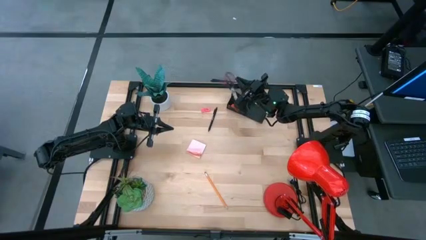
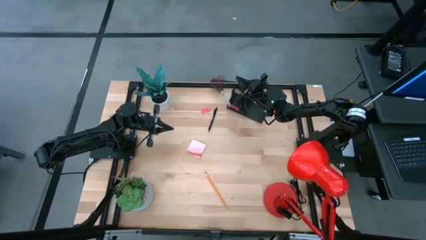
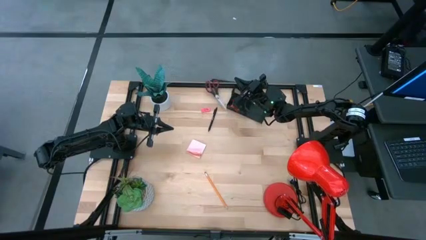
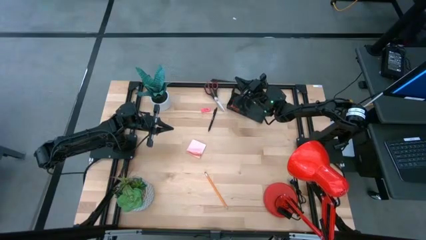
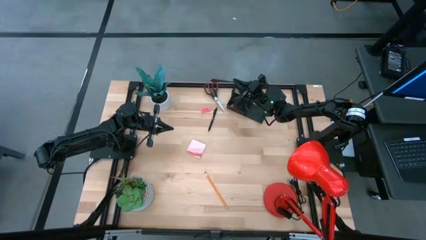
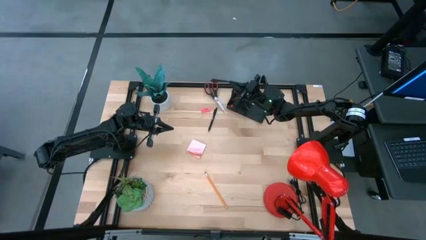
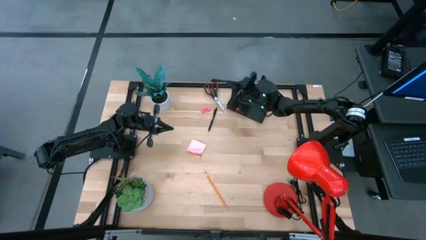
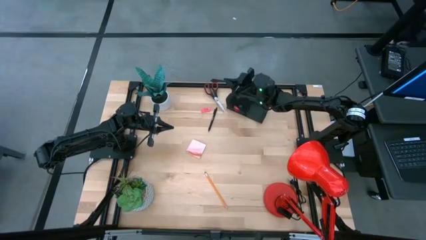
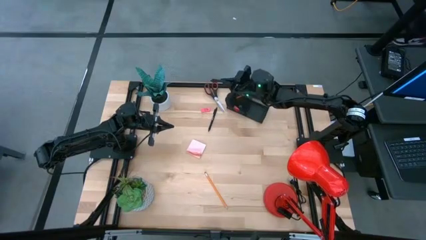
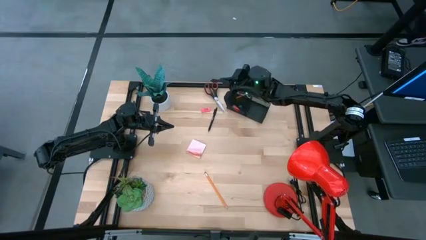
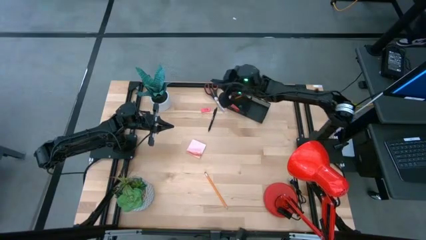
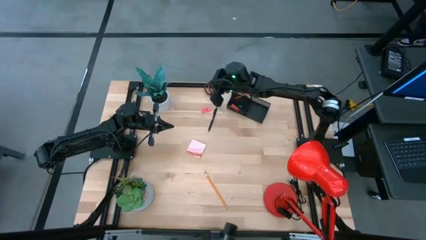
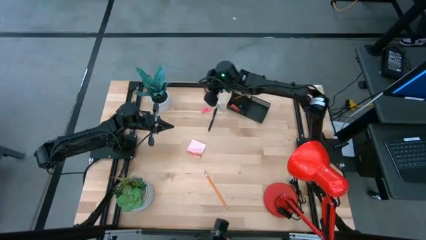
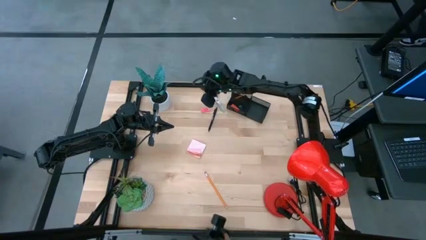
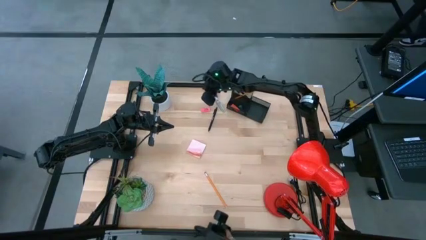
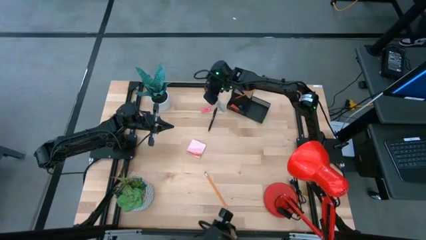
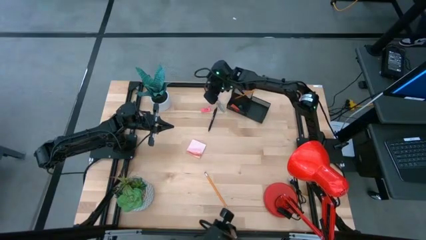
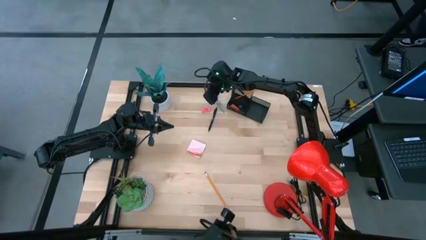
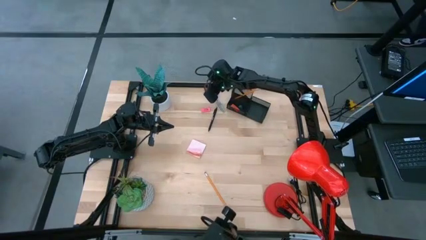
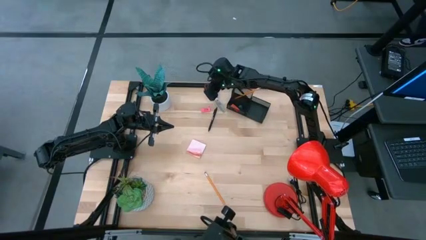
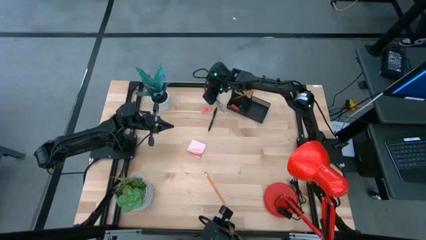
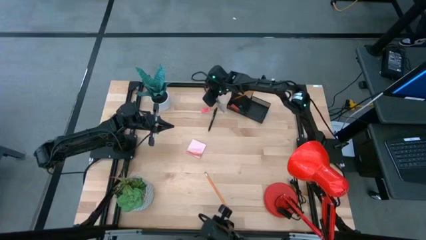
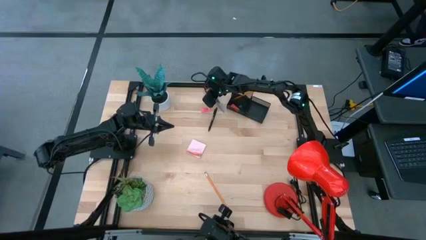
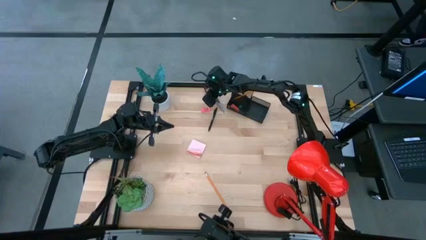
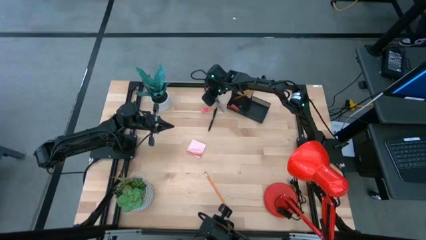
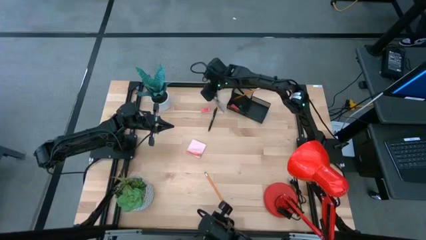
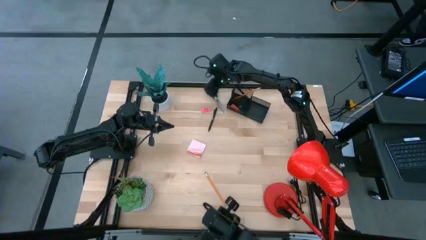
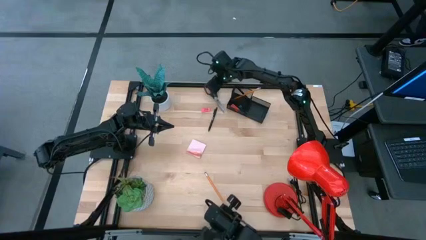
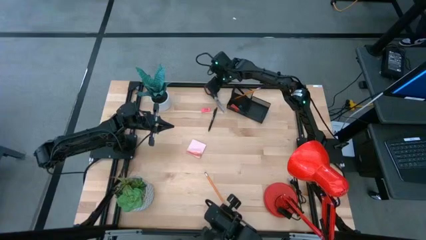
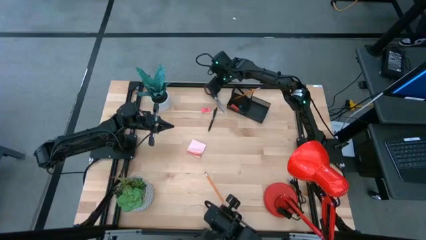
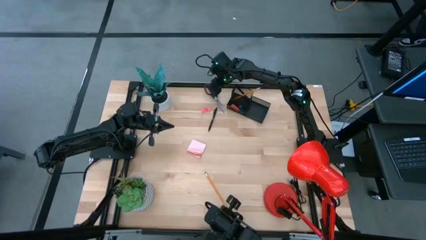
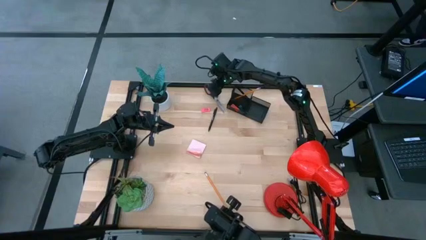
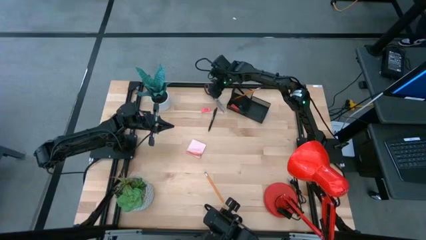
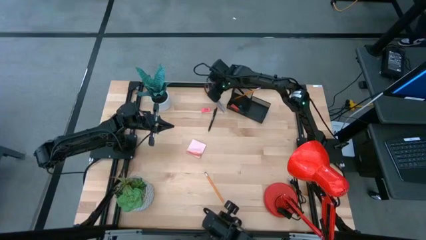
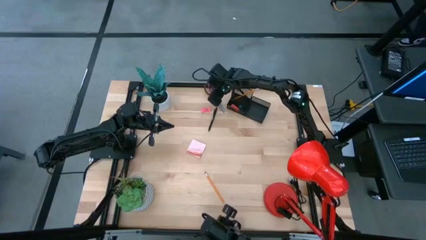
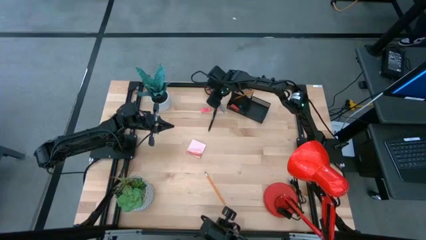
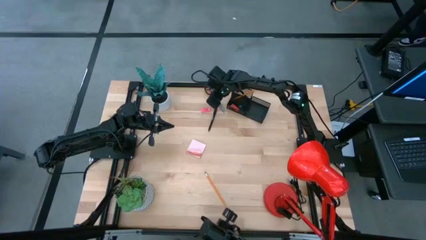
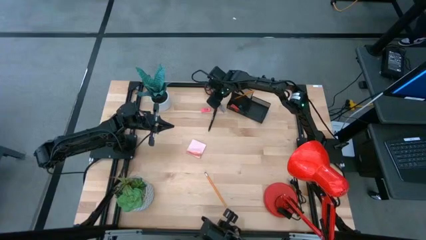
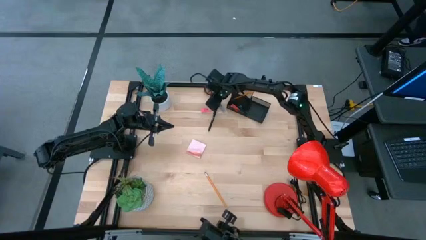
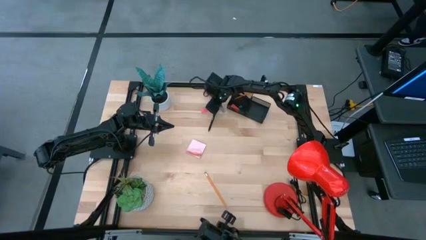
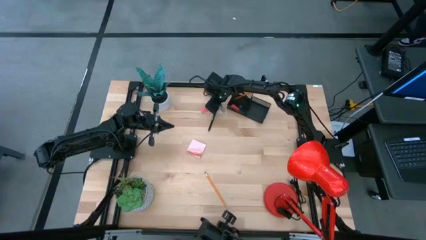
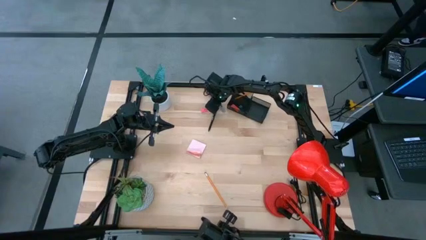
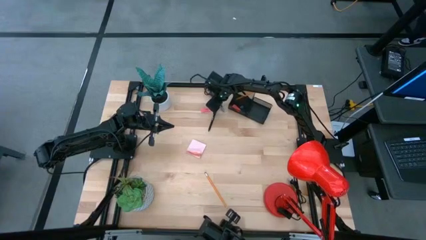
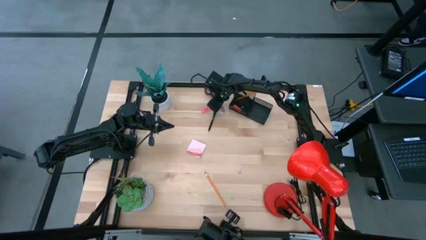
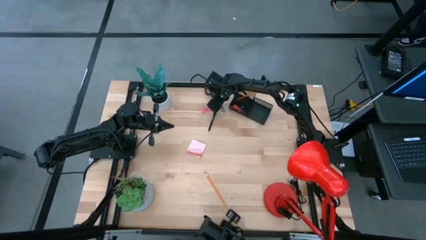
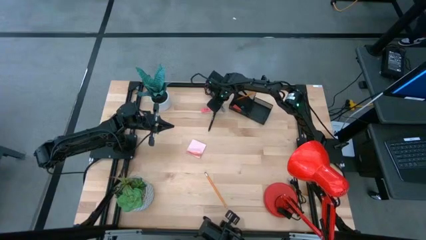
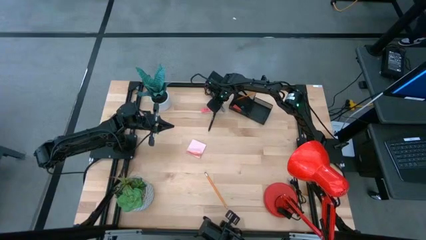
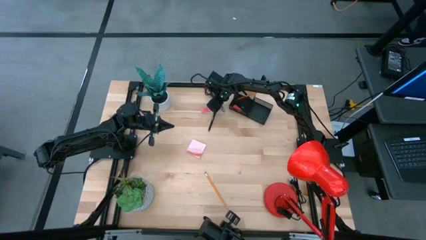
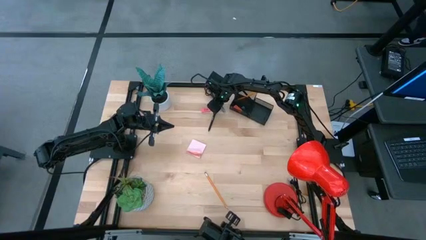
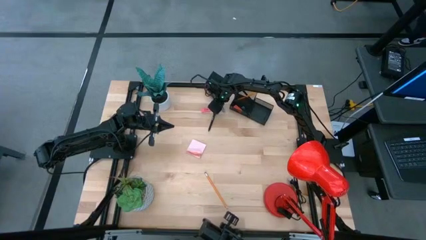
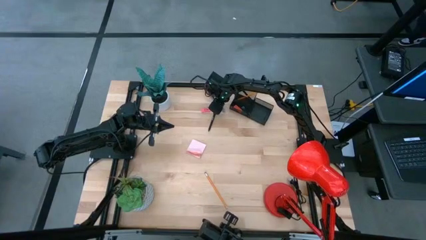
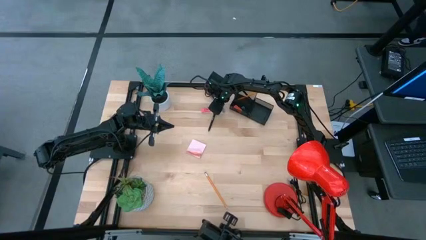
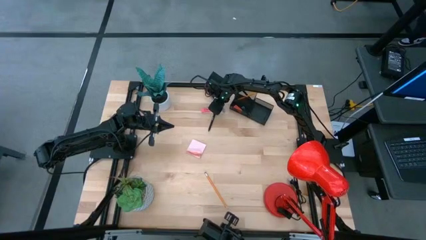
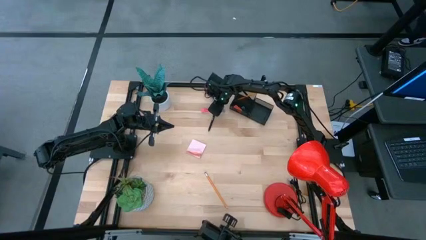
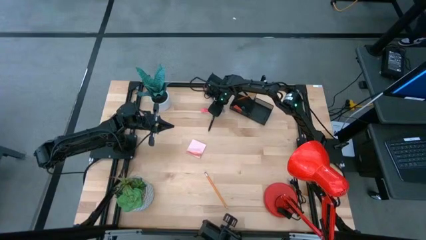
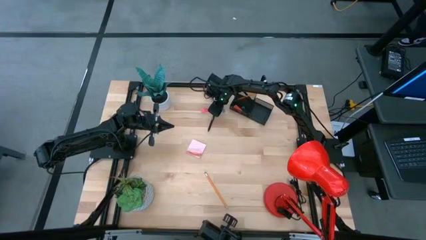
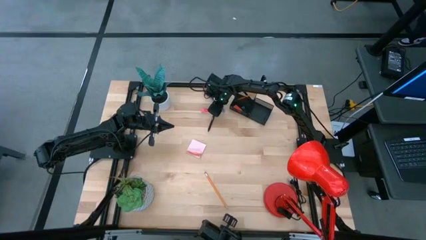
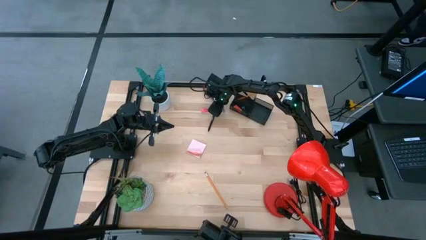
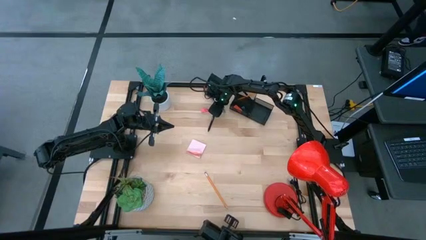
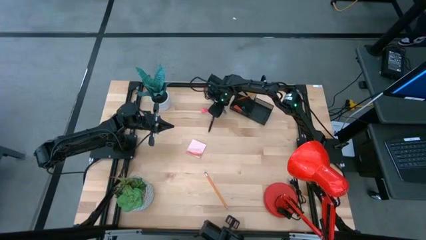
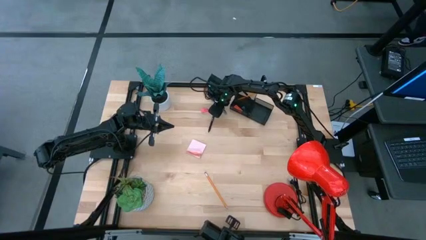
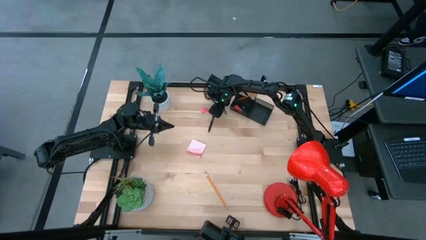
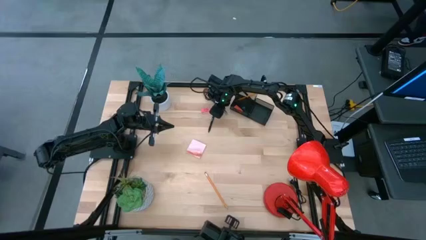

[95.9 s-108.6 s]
Task: Pick and place office supplies into organizer
Put the black scissors into the black desk organizer
